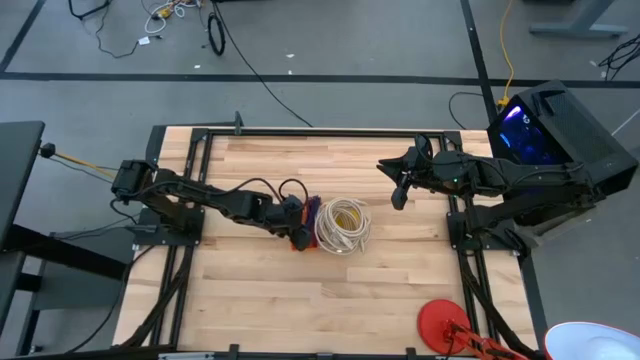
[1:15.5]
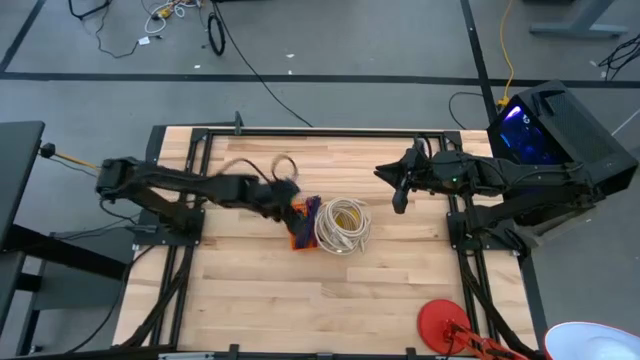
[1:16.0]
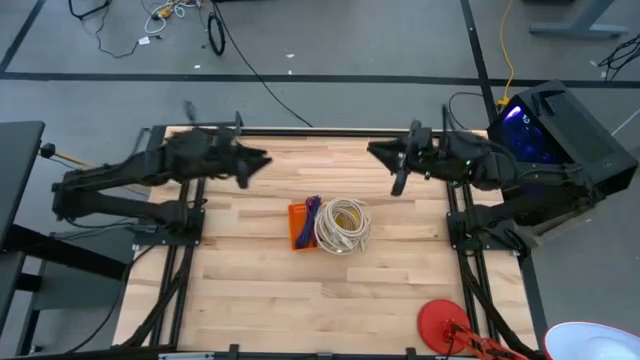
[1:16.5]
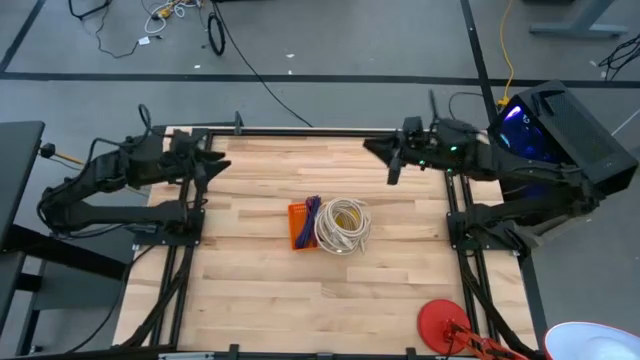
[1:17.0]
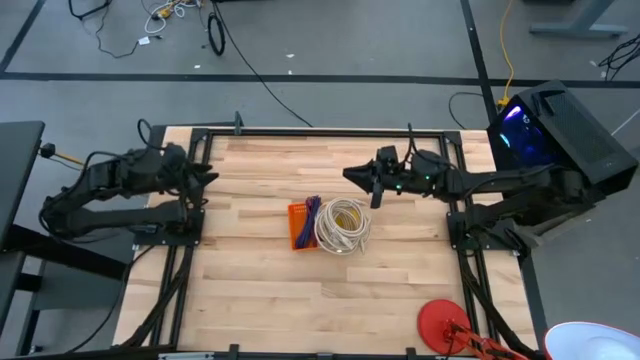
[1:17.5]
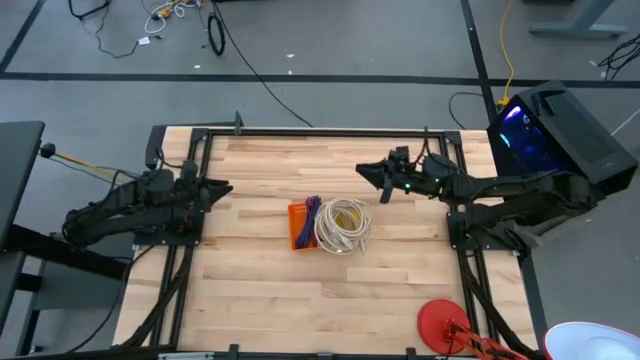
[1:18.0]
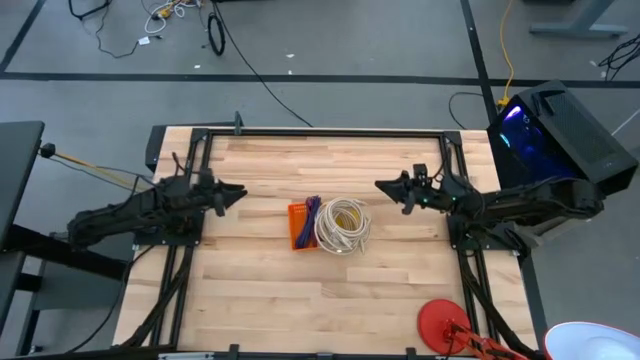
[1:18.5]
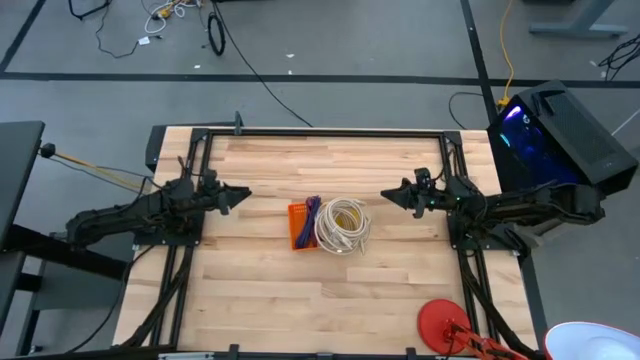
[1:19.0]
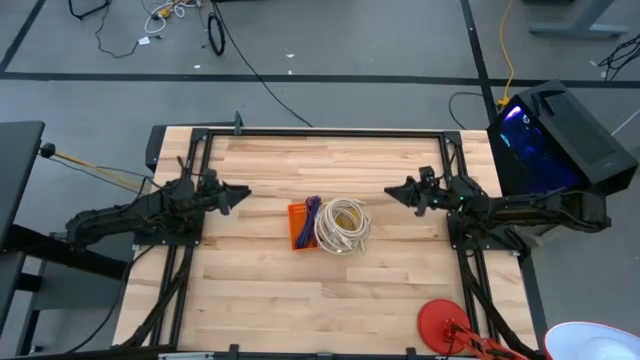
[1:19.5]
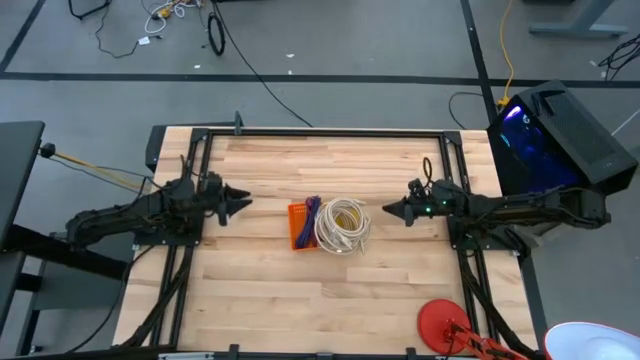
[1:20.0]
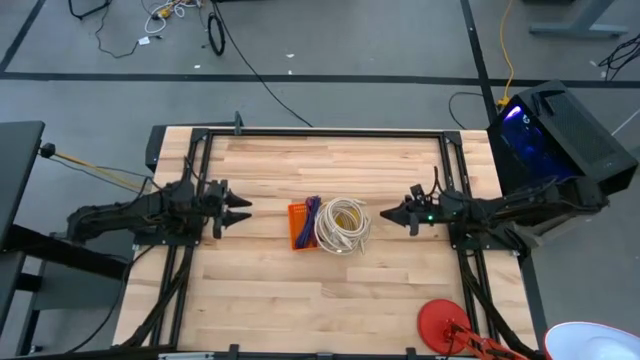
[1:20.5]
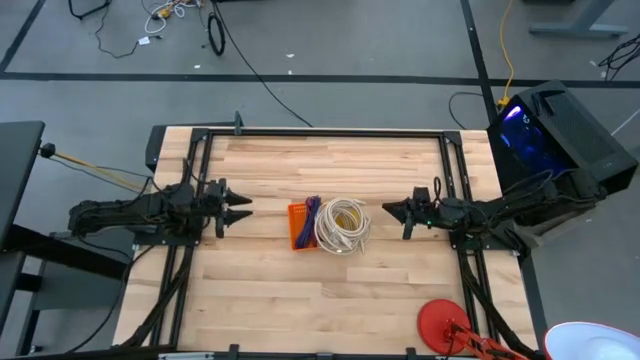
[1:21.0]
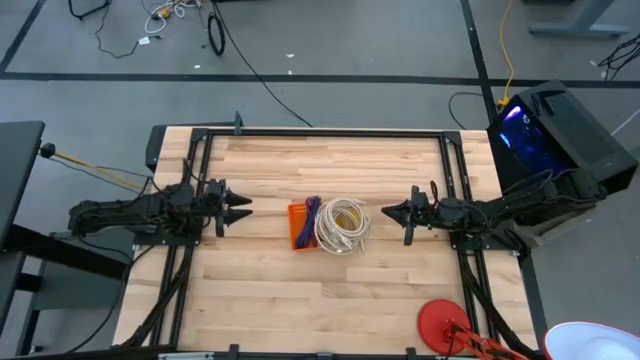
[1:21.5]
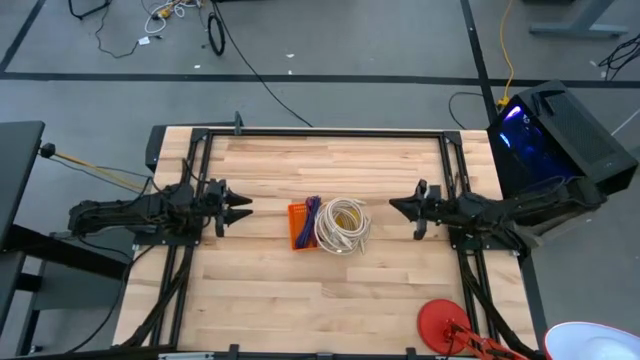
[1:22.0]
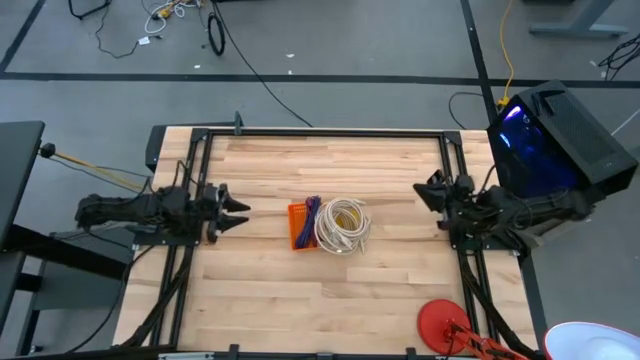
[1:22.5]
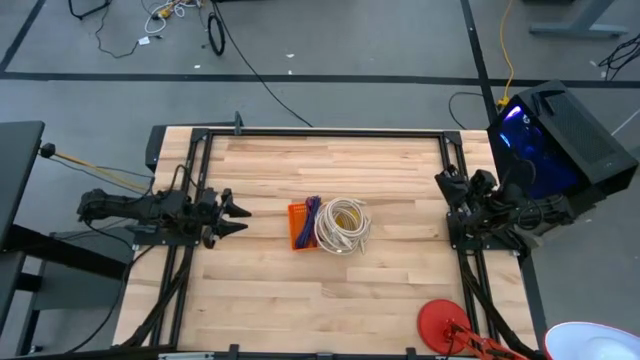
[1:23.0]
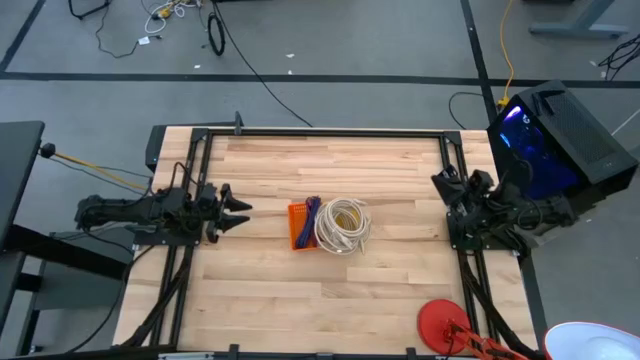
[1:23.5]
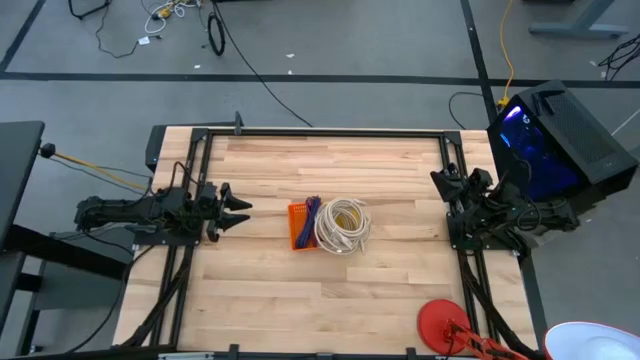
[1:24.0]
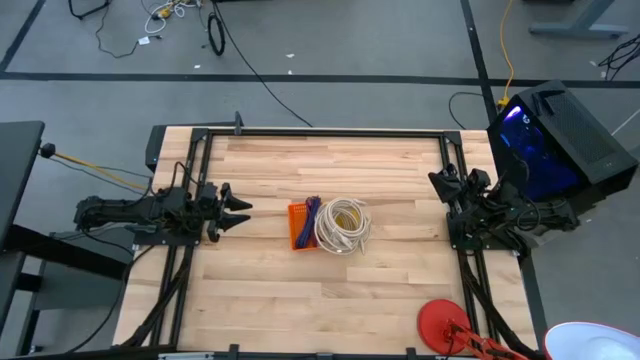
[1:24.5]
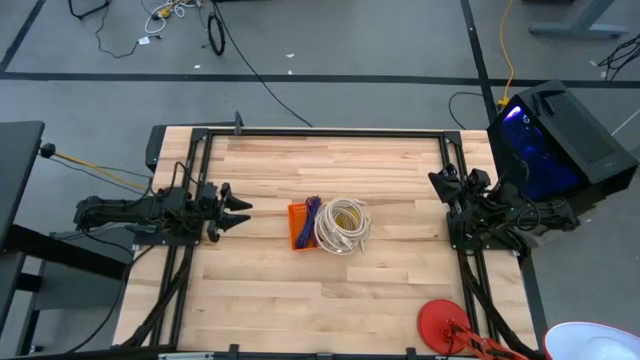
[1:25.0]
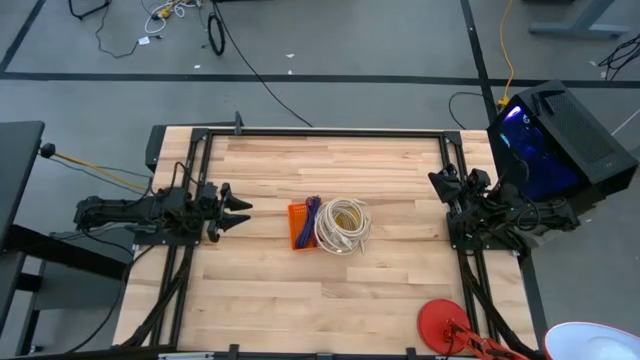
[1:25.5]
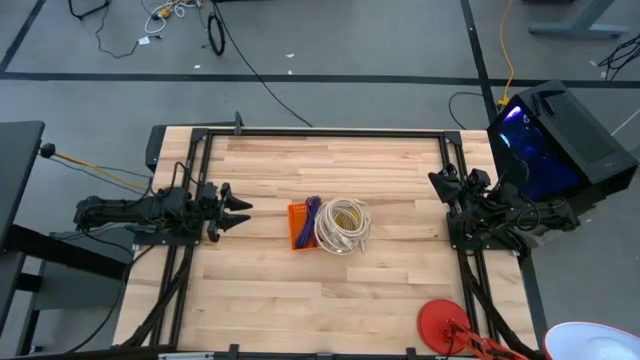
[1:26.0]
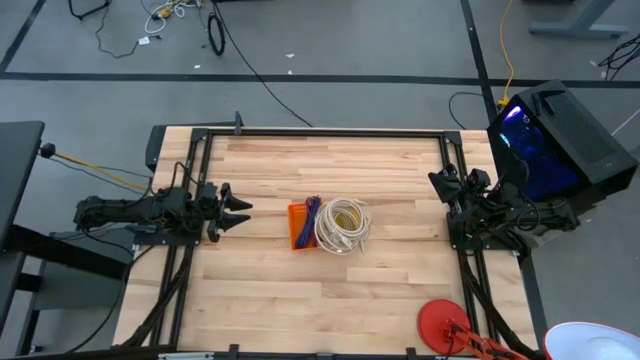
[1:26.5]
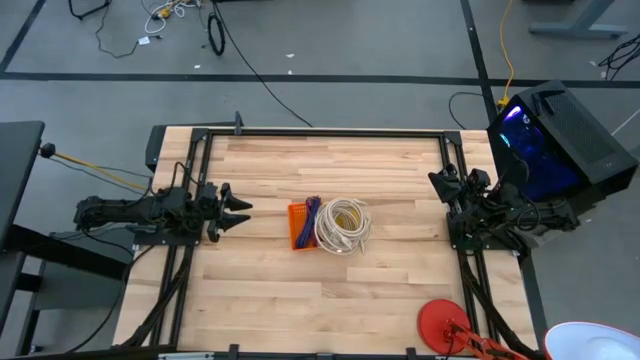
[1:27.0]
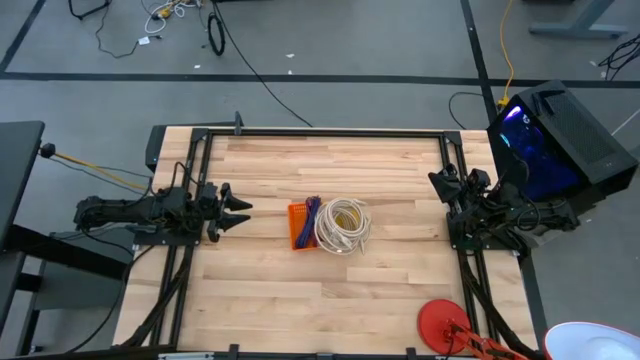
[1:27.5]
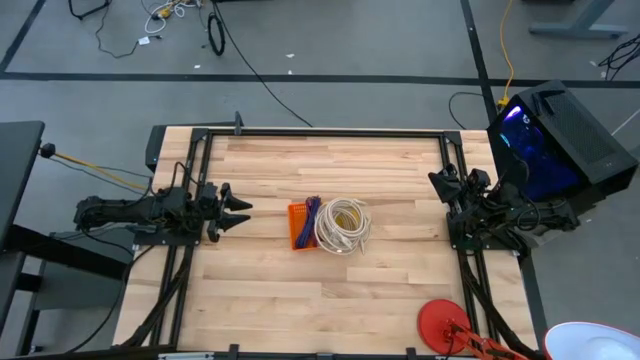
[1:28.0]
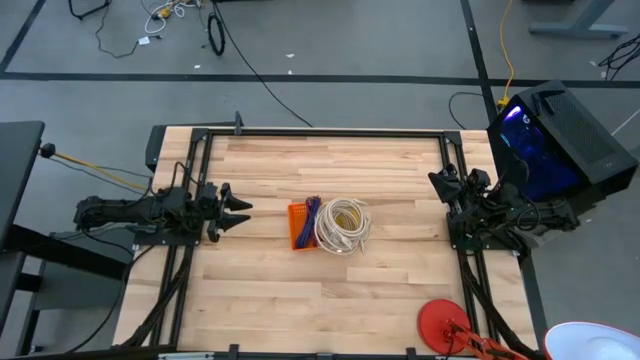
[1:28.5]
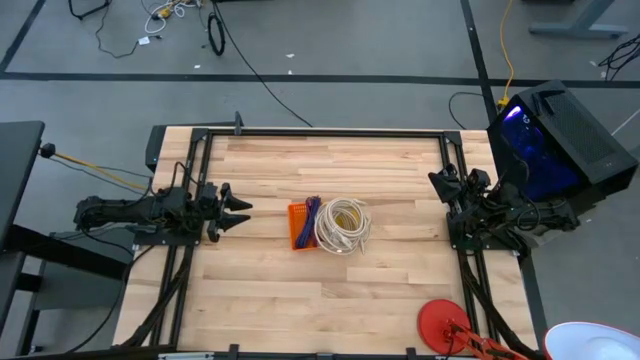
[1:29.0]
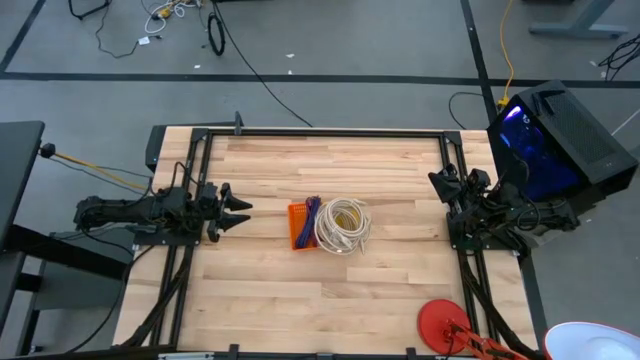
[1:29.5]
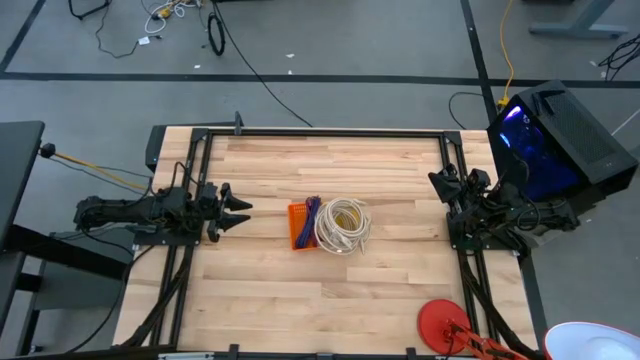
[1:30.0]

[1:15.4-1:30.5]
Task: Pick & Place USB Port
Return to Home Position

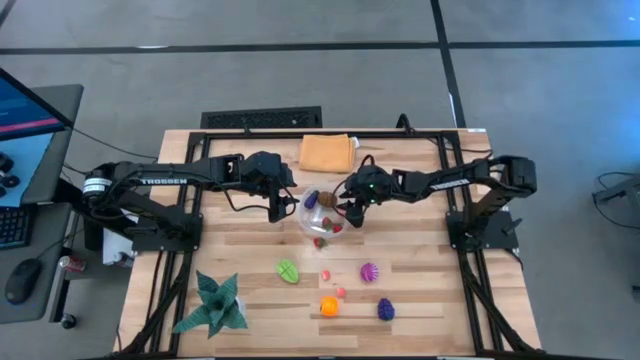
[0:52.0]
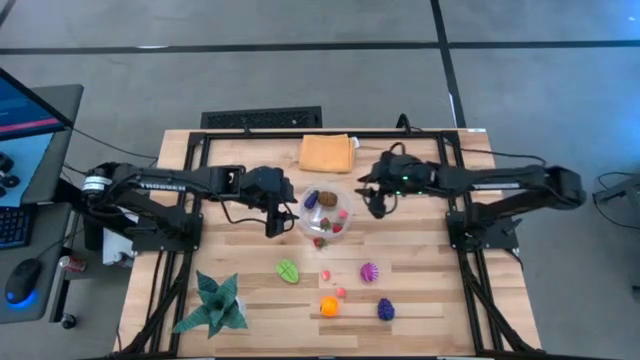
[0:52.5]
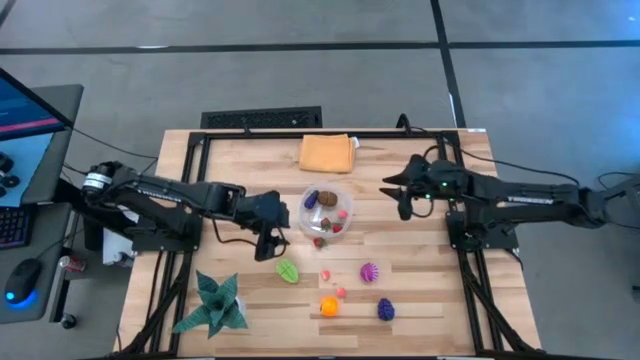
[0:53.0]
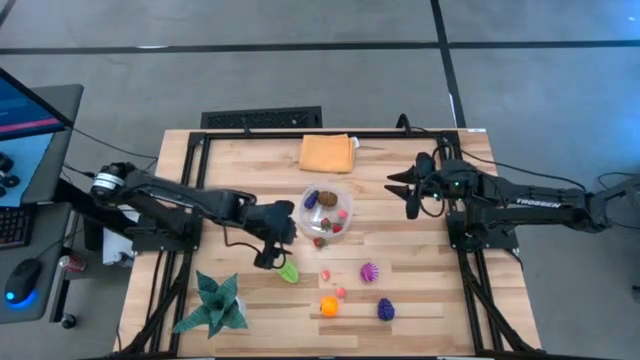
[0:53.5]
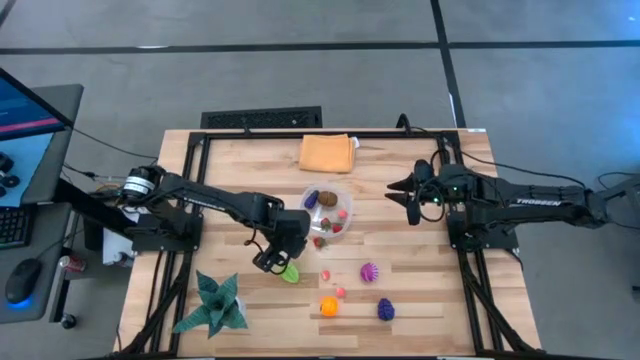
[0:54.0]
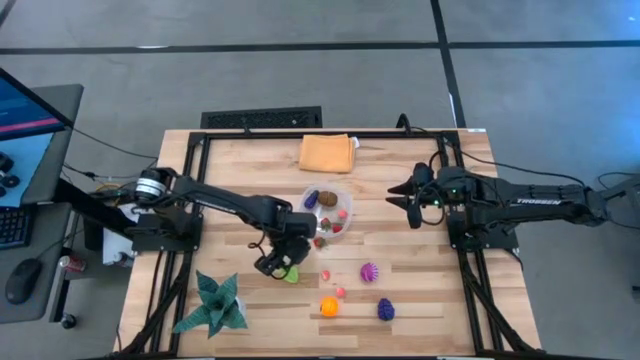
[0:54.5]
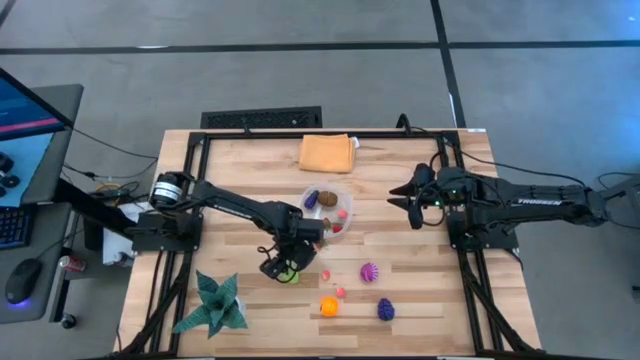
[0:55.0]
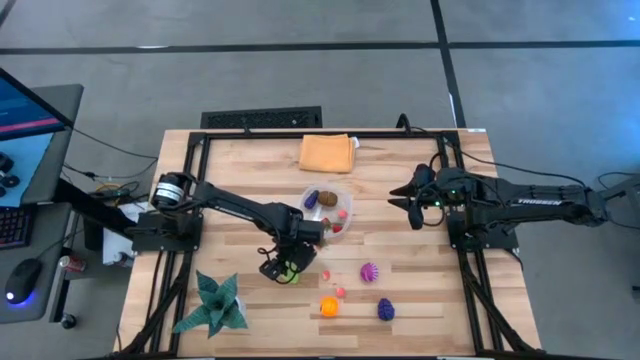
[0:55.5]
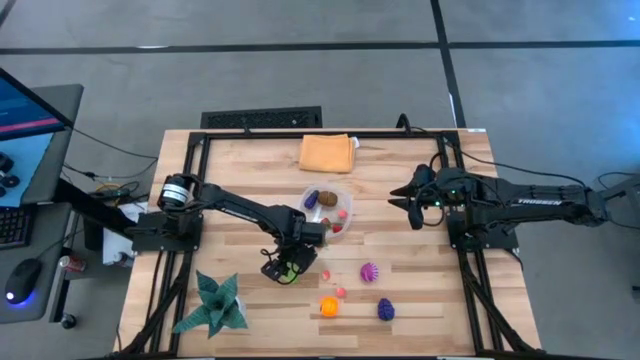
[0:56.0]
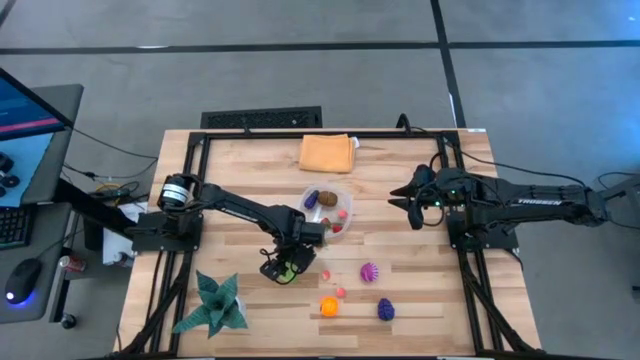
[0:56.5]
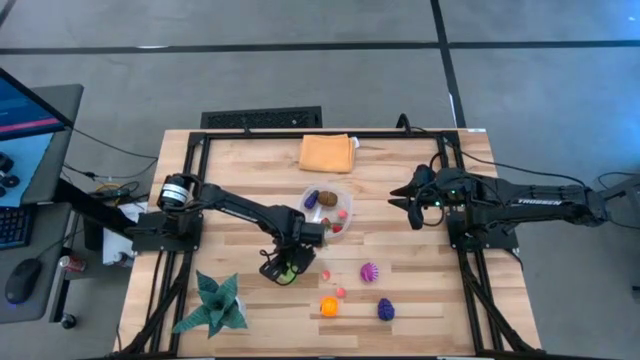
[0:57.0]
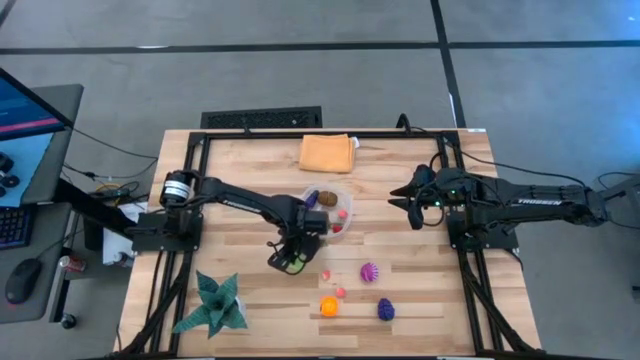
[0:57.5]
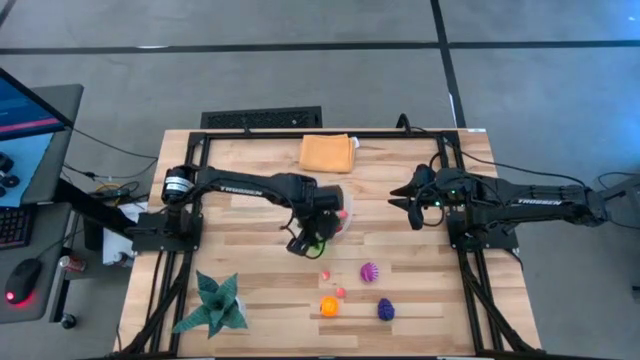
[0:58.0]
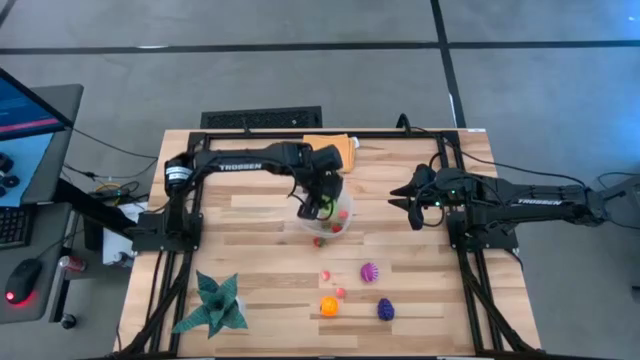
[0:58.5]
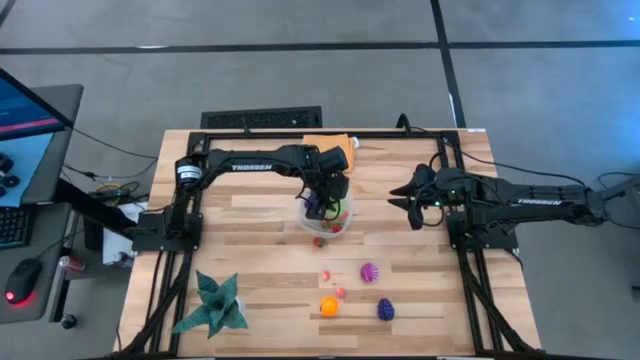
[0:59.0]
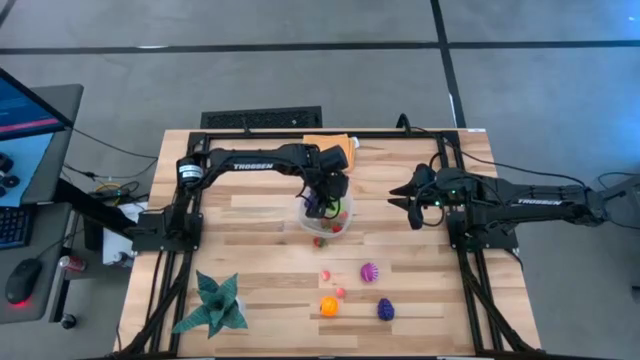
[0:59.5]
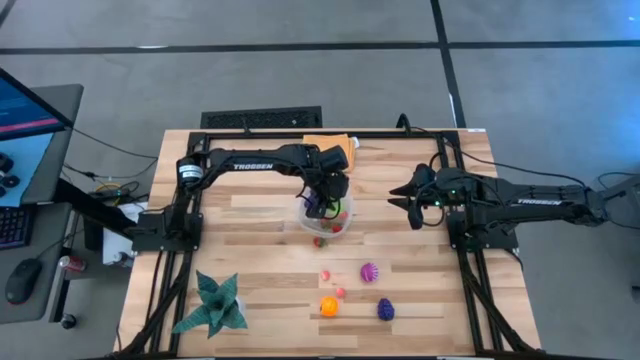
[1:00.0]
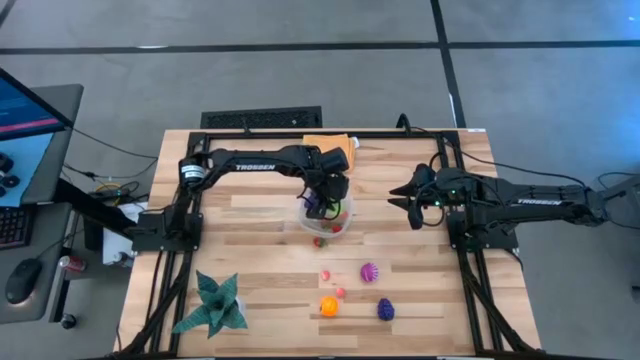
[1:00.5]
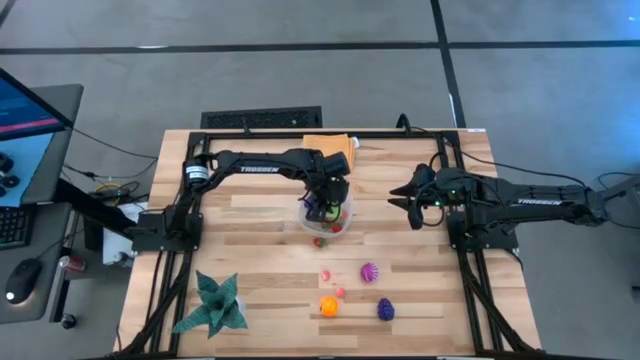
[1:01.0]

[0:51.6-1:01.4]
Task: Pick and placing Produce into tupperware
Put the green starfruit into the transparent container
